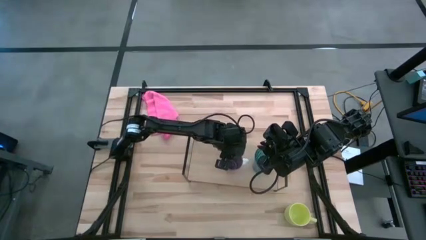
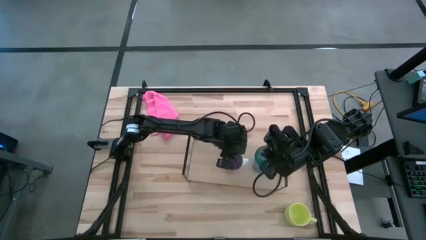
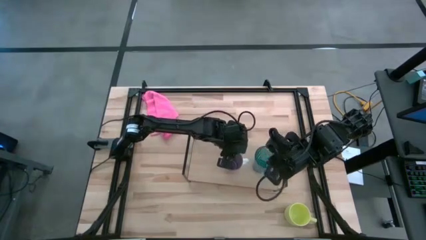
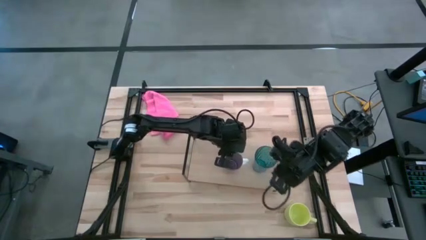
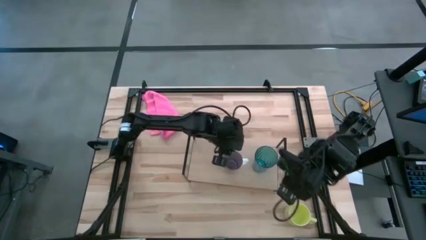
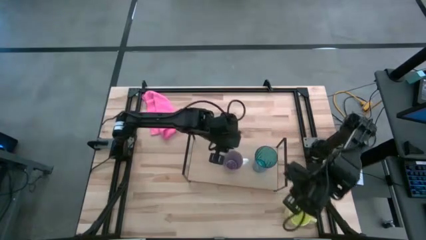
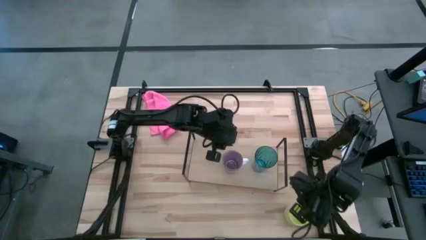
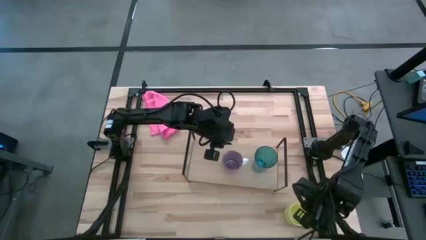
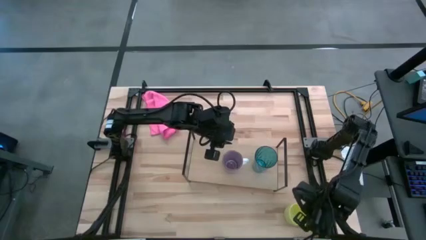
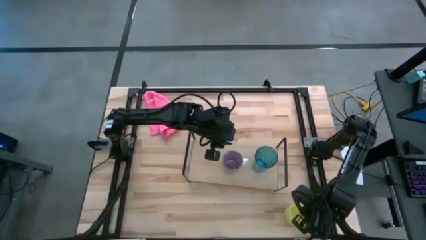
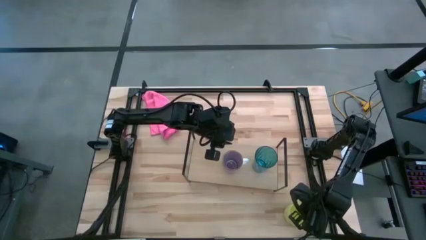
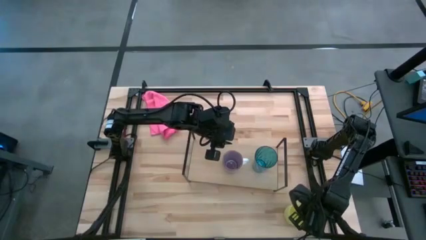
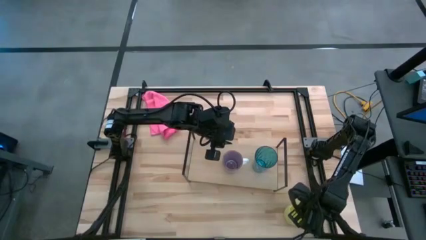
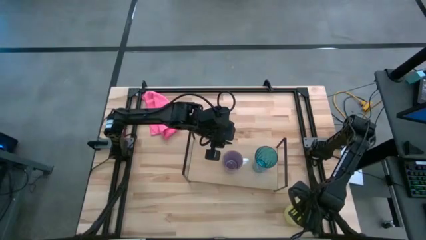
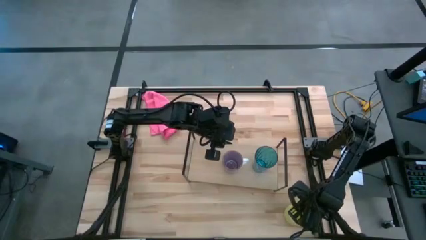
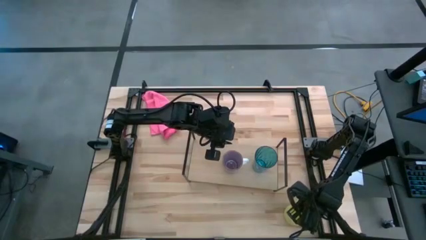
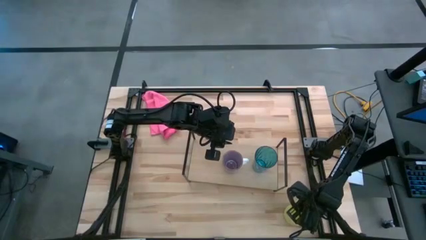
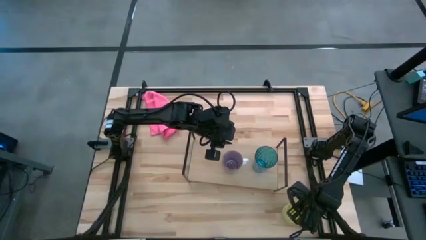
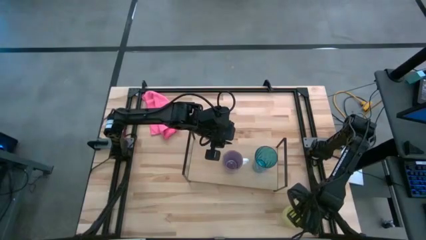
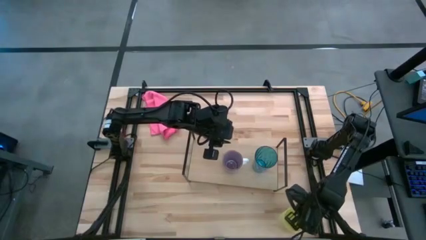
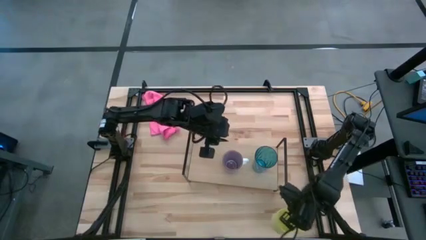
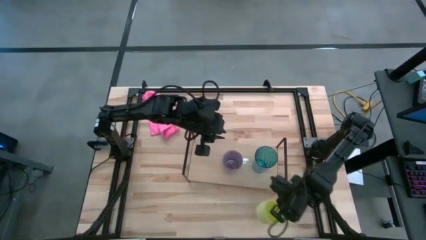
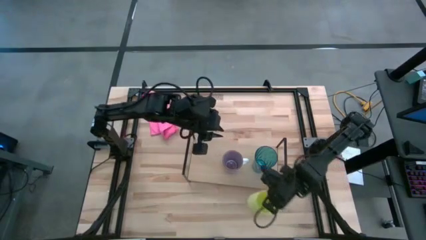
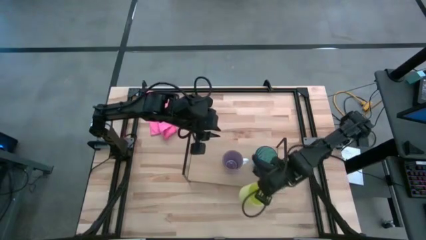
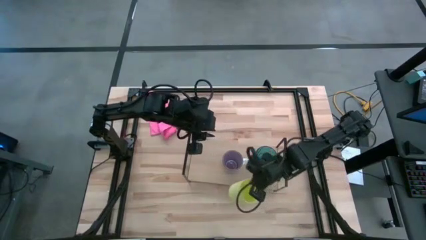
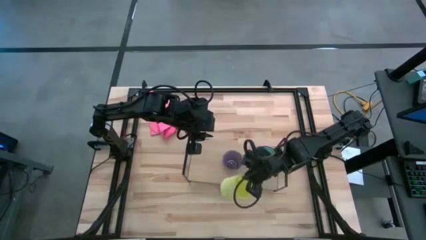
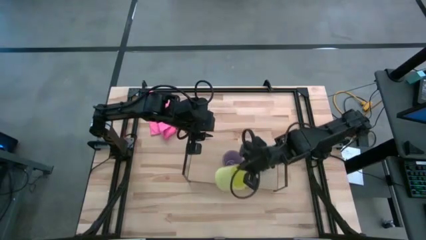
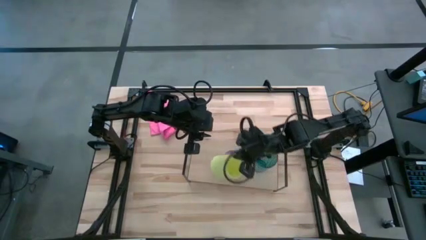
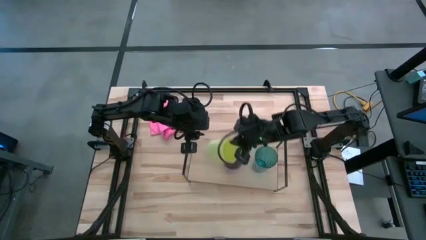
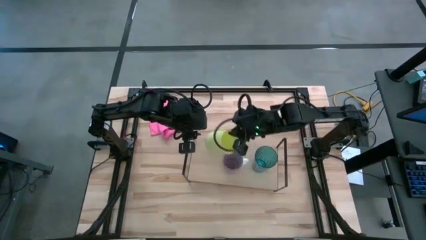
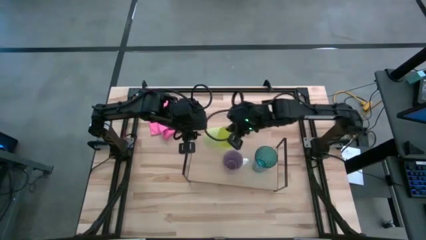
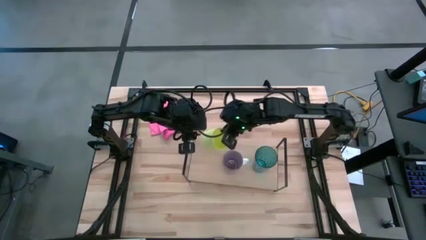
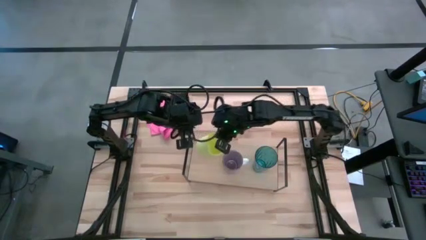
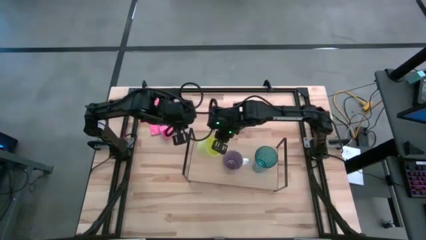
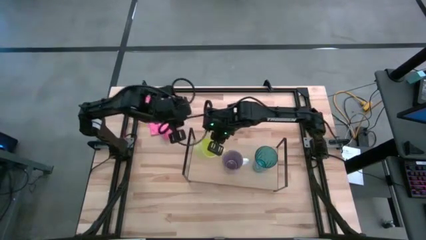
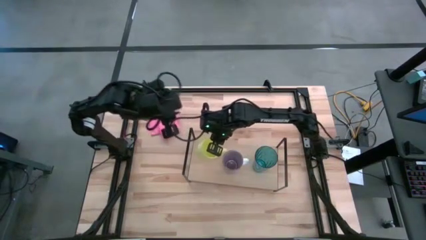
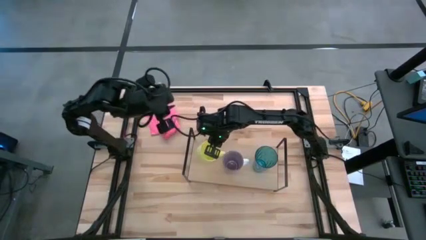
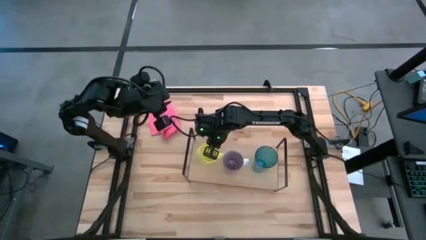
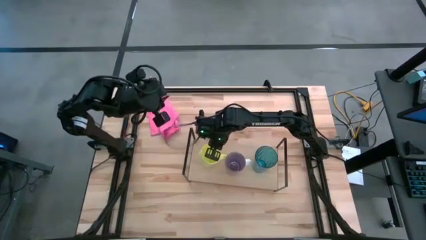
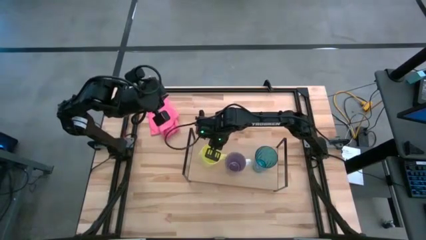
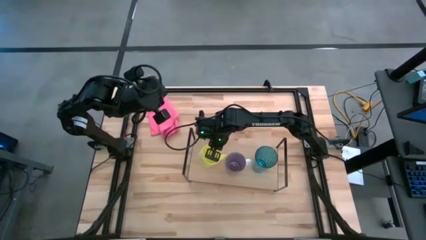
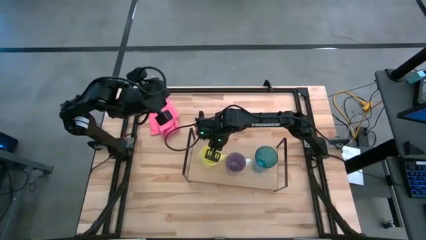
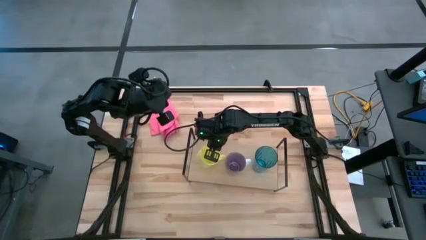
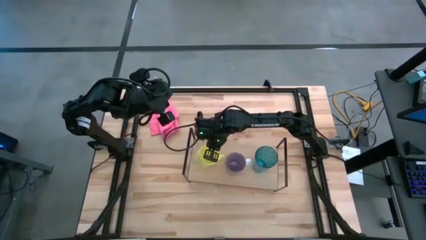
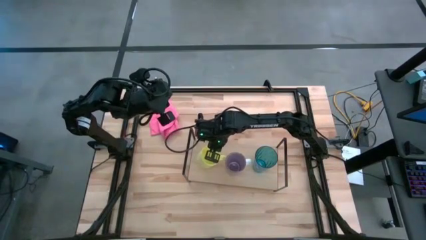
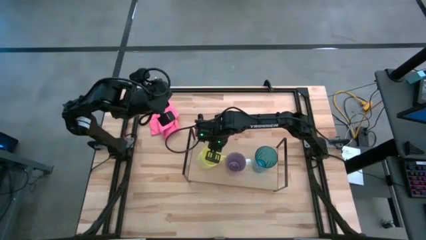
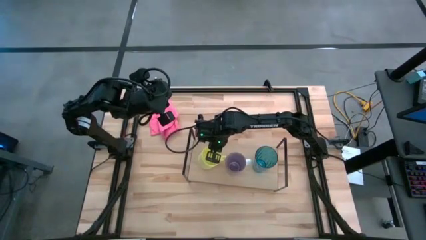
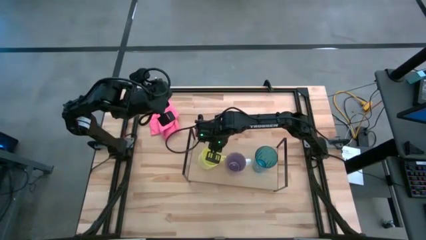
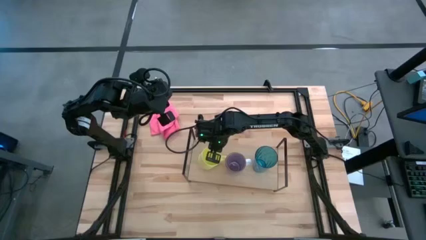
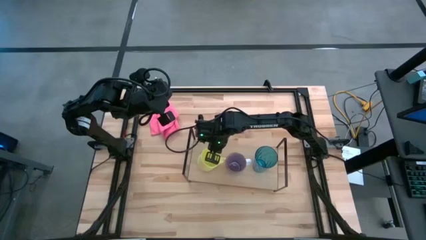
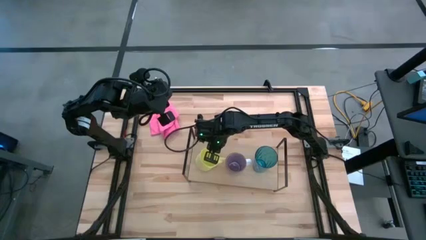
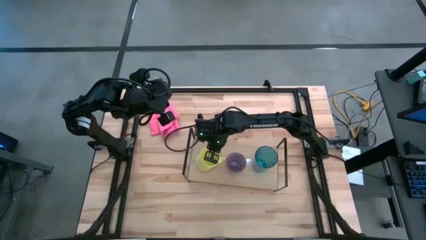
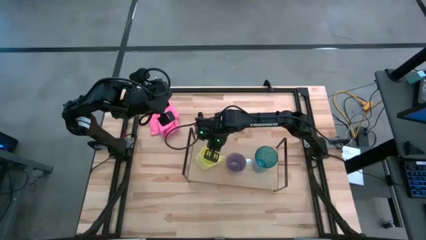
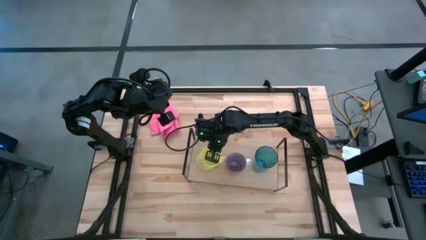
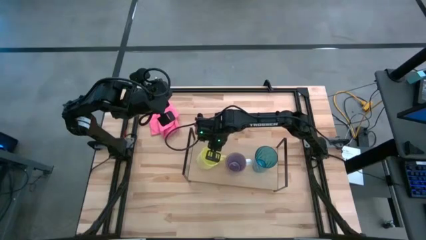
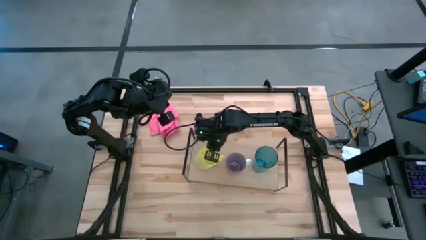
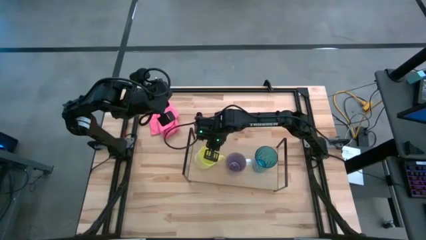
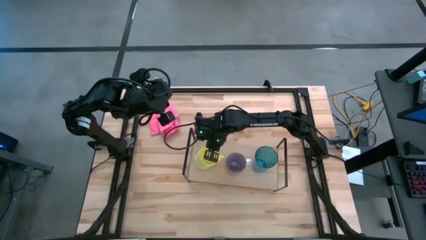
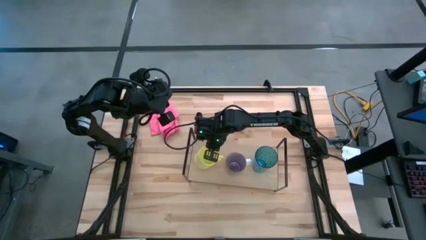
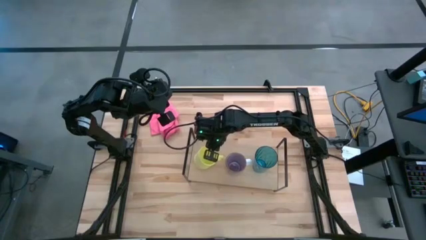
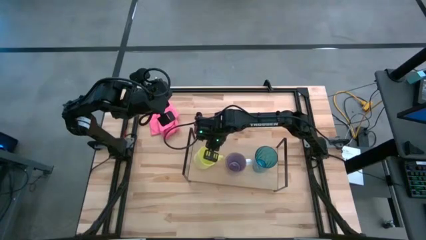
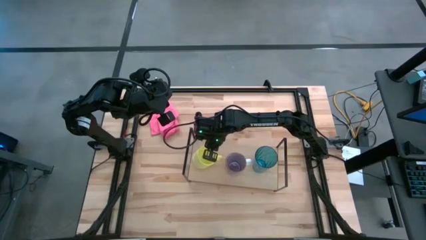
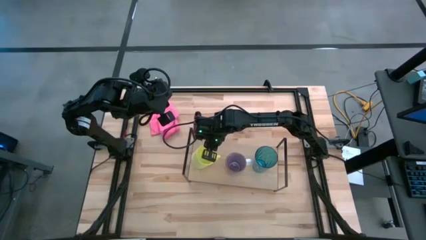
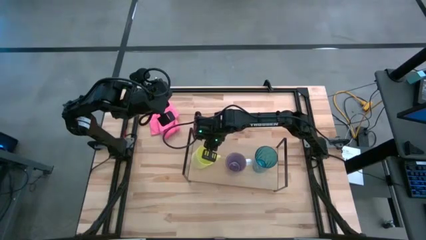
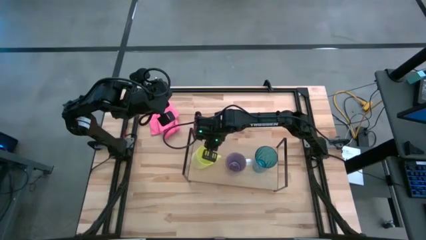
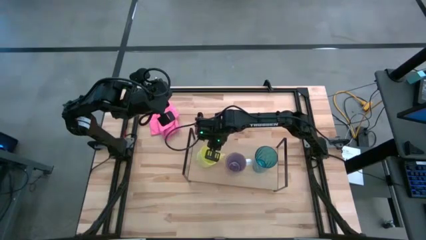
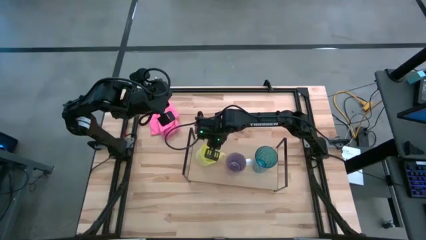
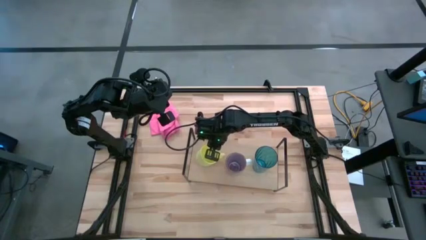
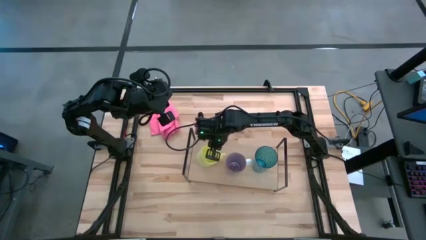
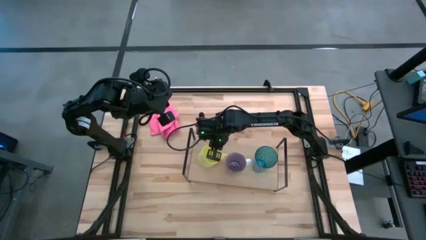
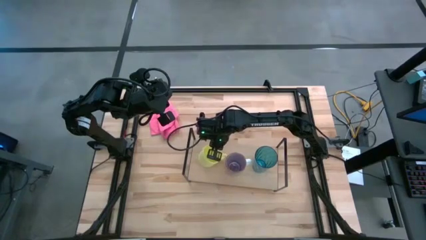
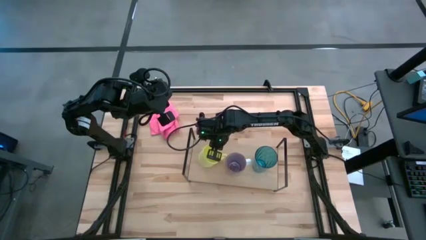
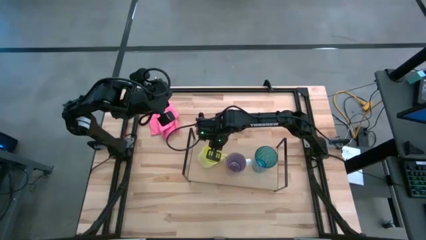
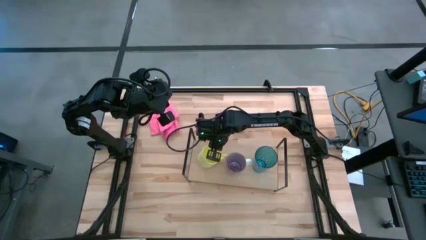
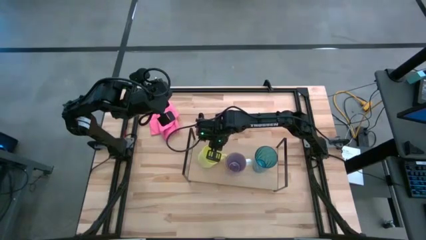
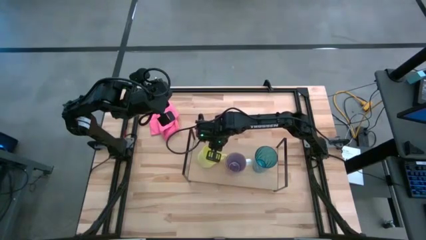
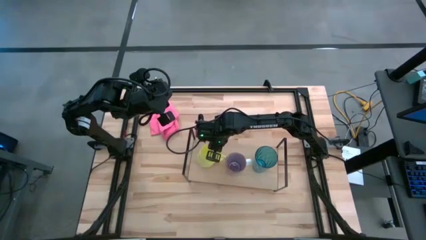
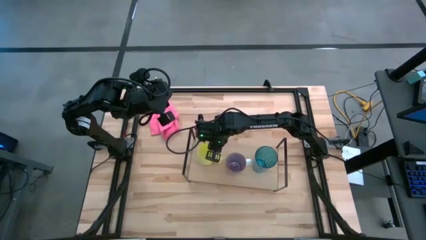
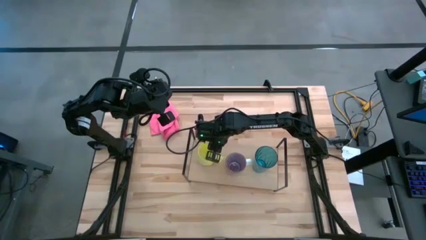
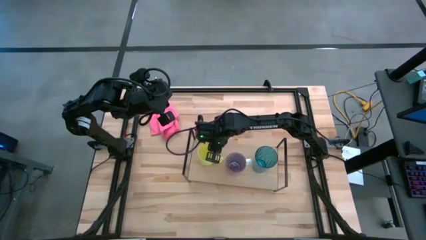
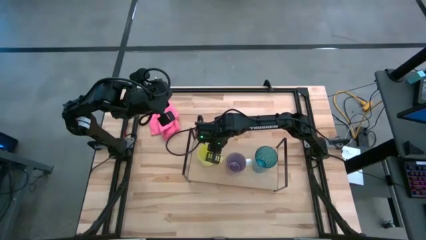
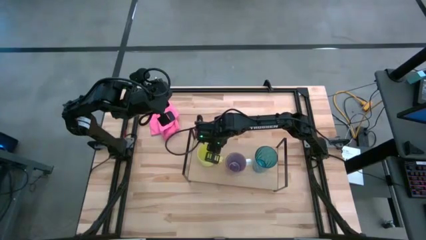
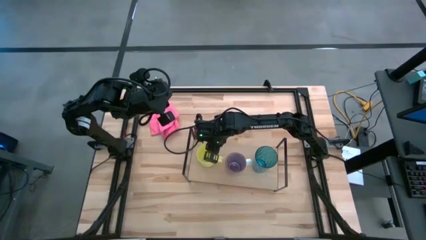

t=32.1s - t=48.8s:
Task: Stack small to large cups/mugs on shelf
Put yellow mug on the shelf
